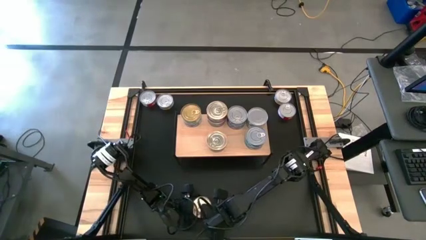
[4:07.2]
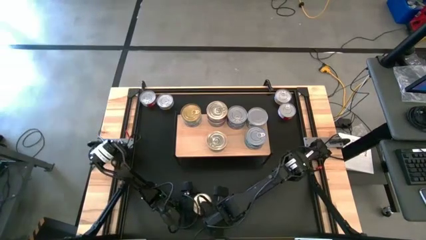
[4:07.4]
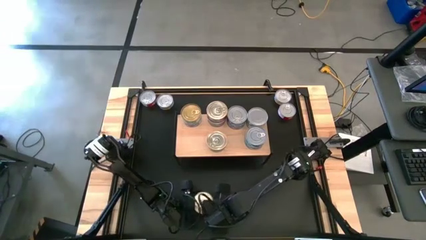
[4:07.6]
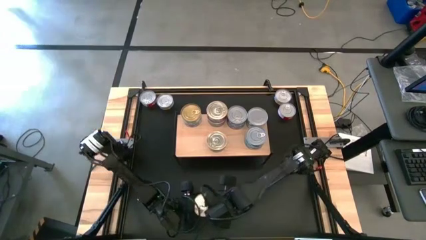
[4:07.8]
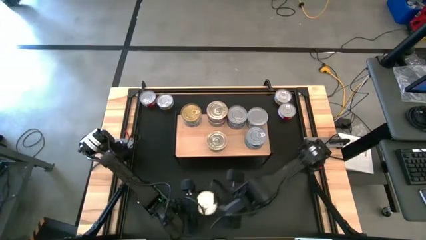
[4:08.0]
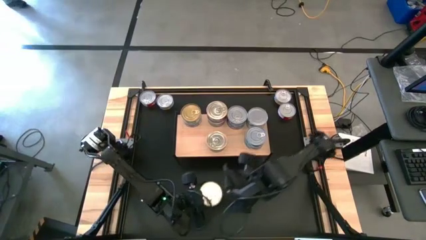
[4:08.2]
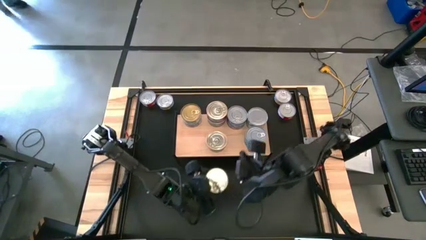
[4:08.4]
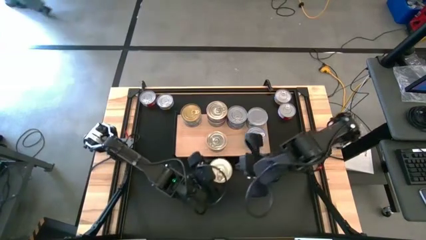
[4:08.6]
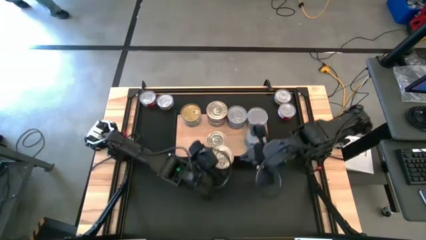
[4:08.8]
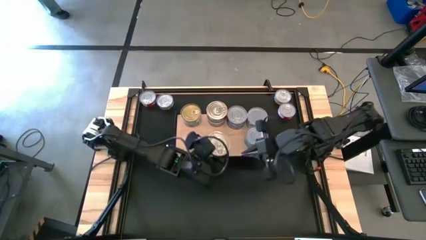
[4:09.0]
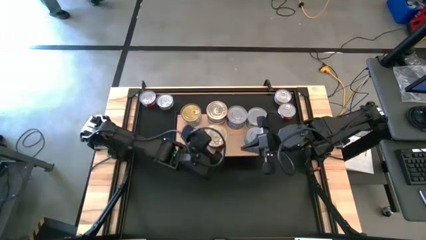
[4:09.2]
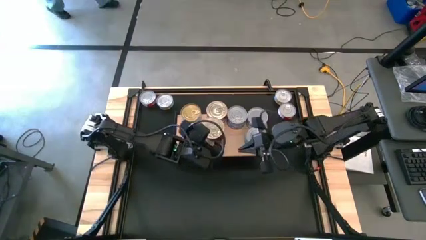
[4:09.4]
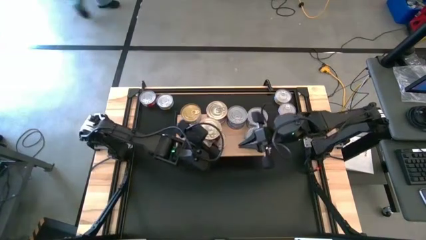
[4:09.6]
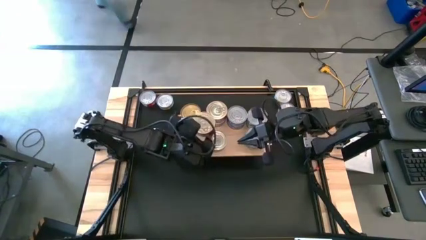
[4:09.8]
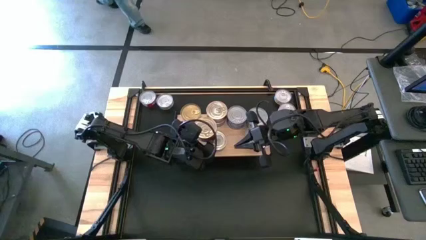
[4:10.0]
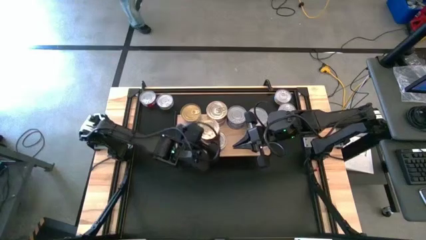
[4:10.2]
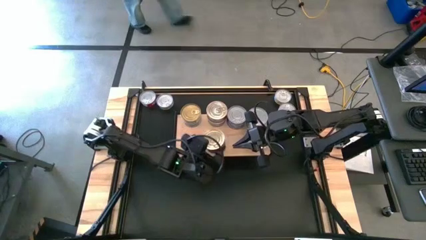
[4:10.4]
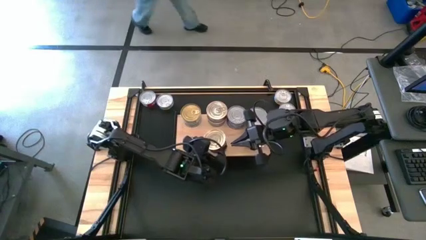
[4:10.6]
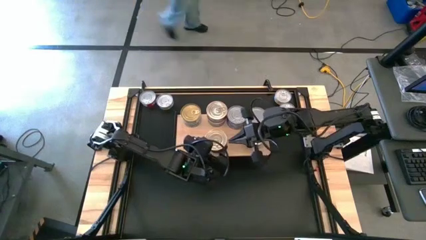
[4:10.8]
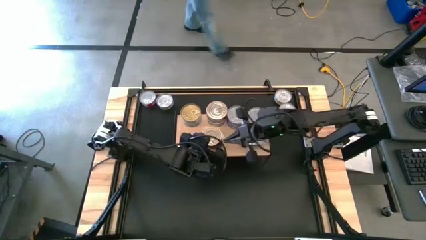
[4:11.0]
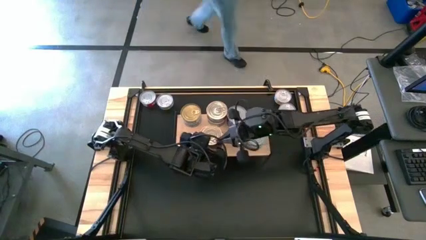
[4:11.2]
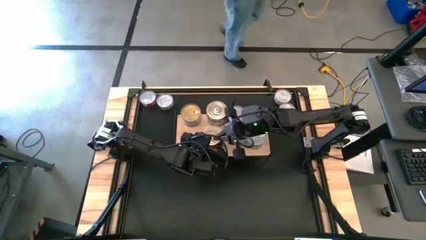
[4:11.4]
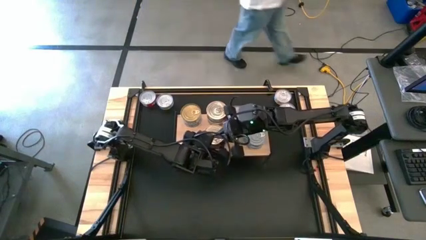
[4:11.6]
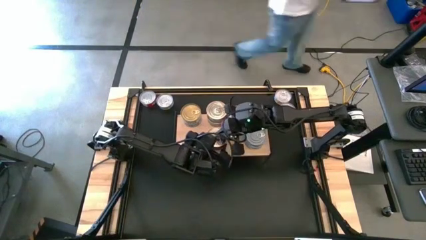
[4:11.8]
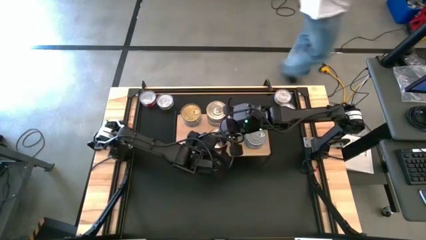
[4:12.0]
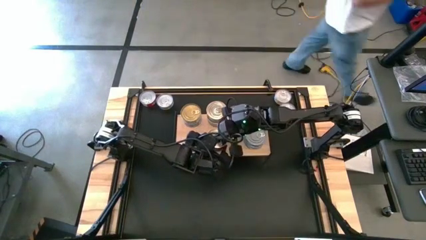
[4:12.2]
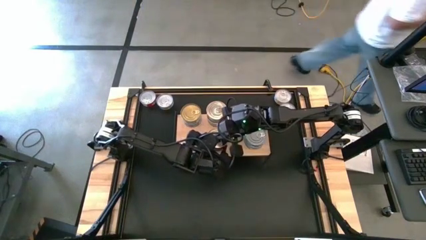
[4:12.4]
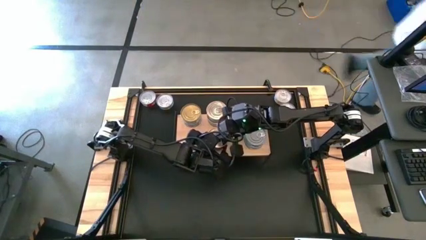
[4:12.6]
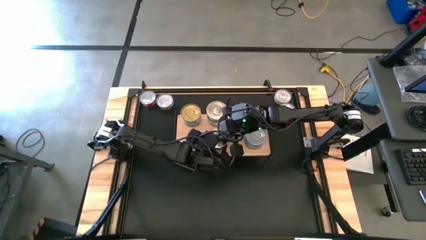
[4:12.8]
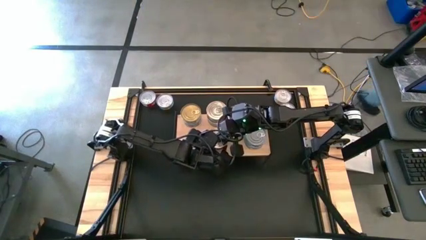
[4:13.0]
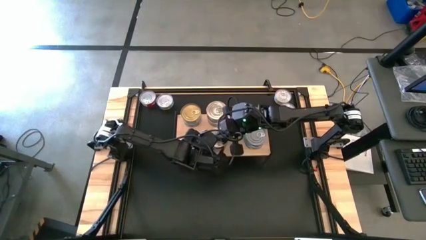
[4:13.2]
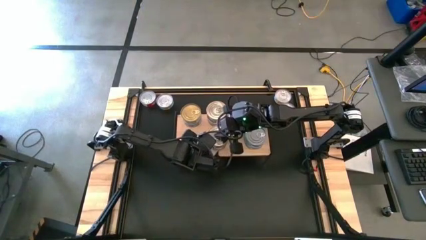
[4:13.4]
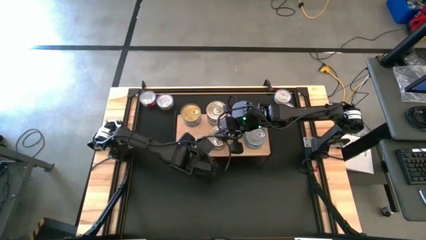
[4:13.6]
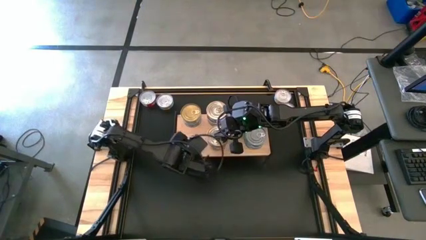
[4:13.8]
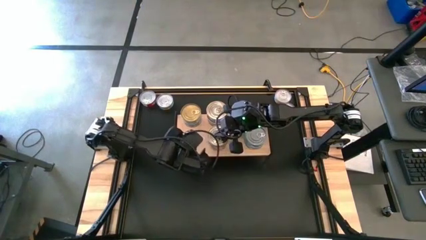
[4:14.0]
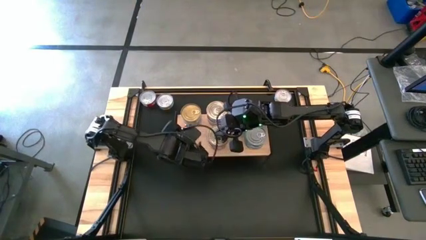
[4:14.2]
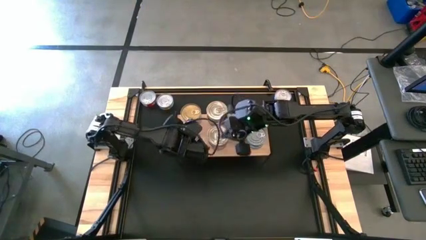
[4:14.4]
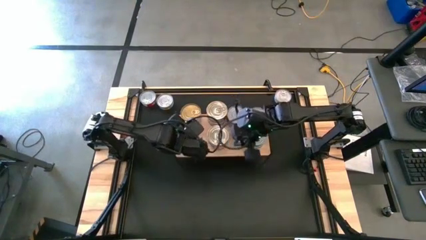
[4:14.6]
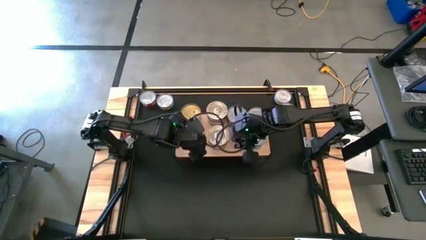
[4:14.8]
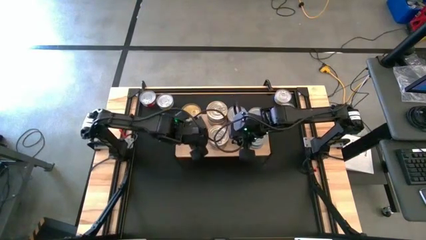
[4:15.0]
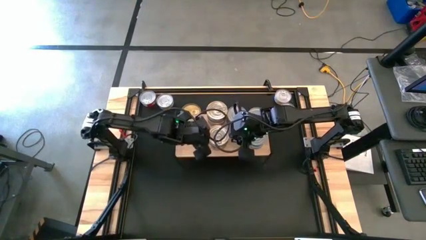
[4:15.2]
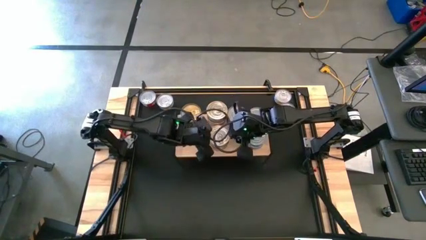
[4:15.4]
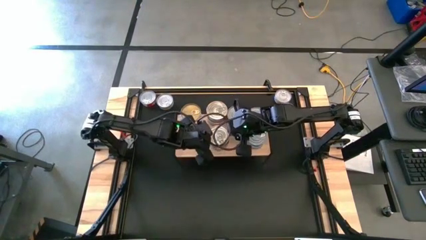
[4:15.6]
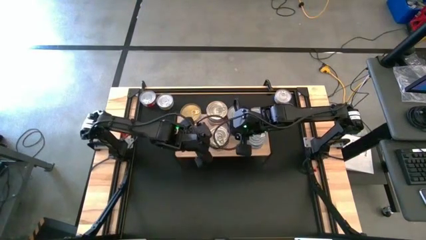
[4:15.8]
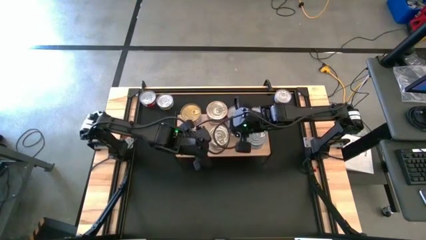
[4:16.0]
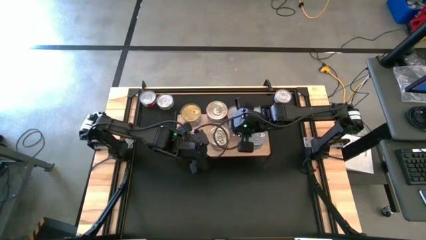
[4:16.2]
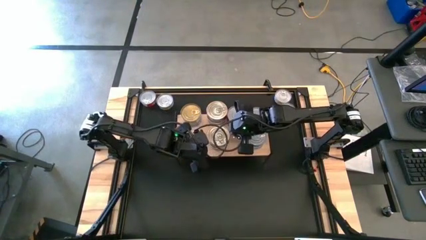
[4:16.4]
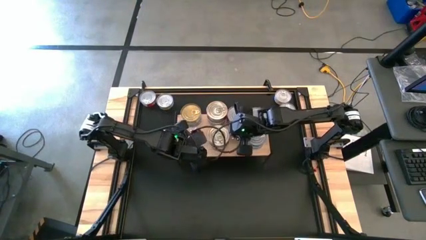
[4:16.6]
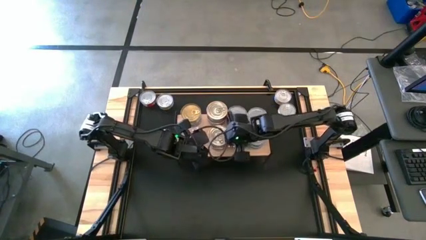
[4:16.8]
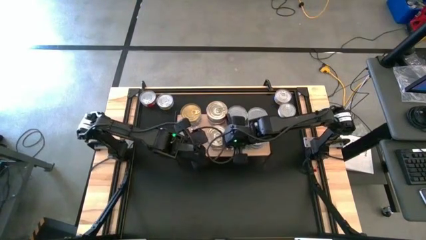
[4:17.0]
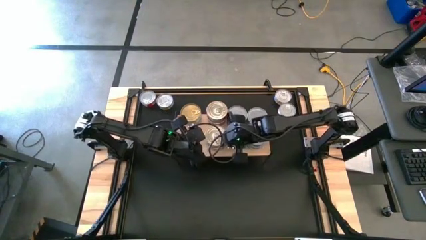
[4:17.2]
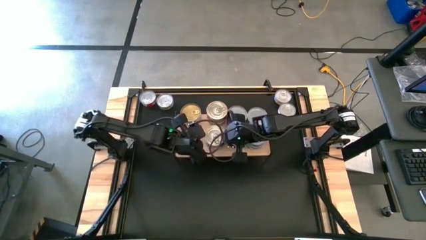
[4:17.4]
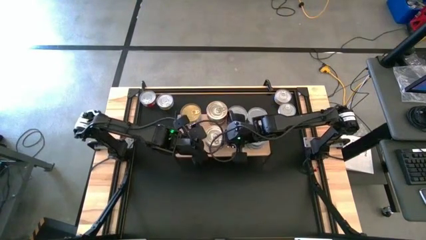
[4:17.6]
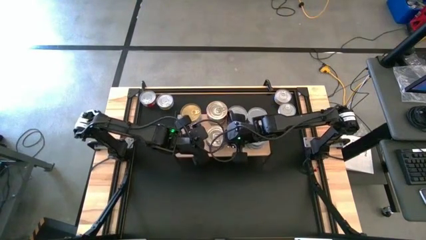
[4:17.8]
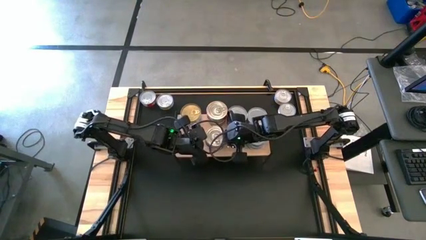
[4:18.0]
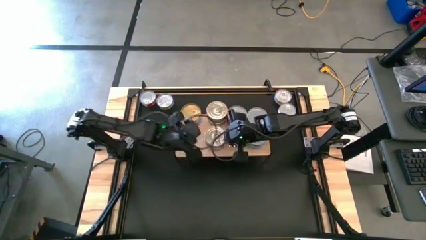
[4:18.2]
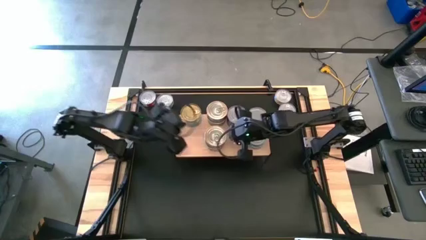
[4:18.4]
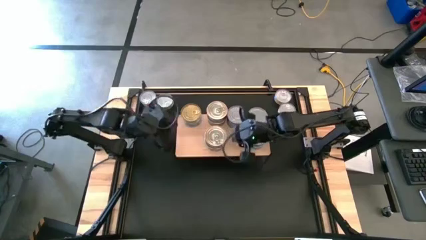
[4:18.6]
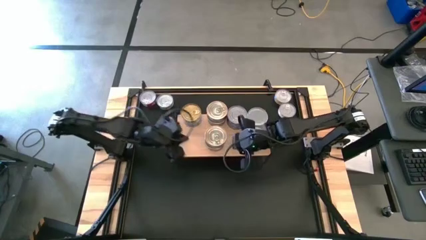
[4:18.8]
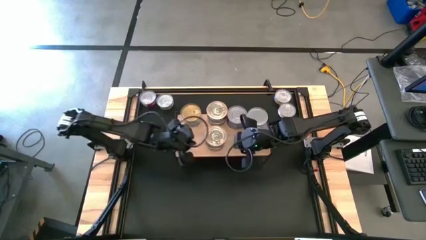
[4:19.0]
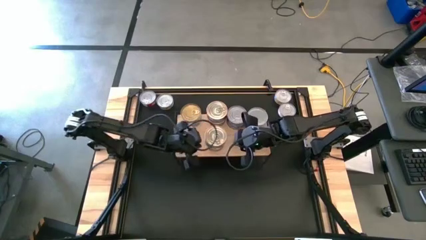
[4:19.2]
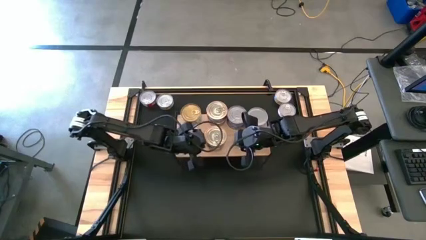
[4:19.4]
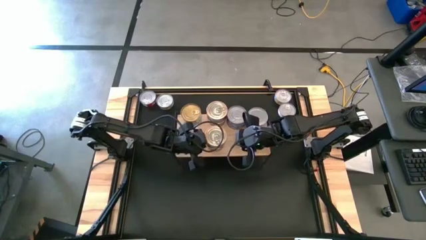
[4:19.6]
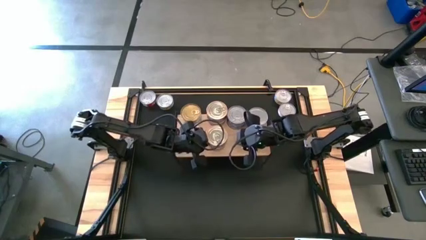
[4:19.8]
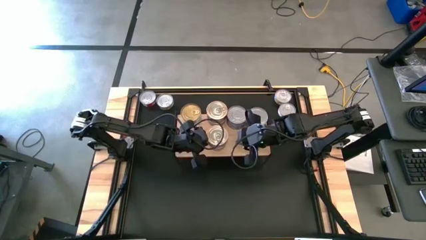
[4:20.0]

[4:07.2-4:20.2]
Task: Stack canned seafood by type on shelf
Stack the blue pink tuna can on top of the blue pink tuna can on the shelf

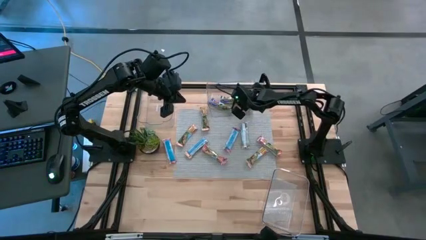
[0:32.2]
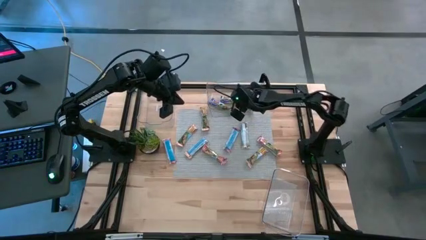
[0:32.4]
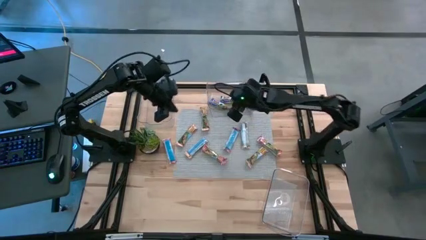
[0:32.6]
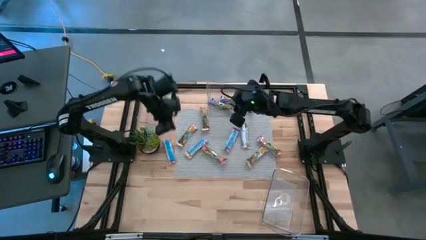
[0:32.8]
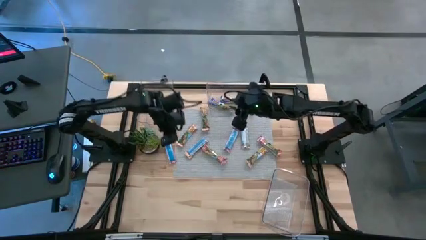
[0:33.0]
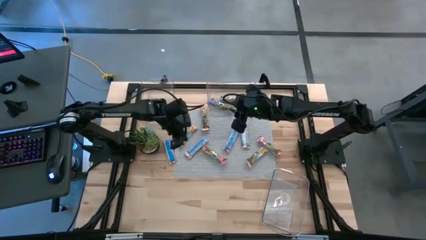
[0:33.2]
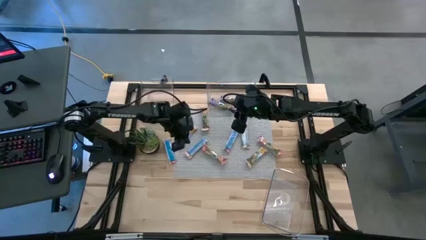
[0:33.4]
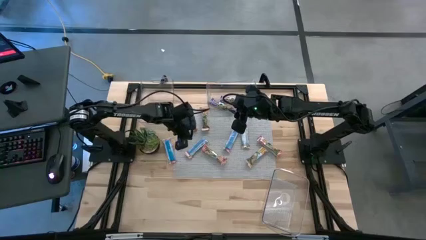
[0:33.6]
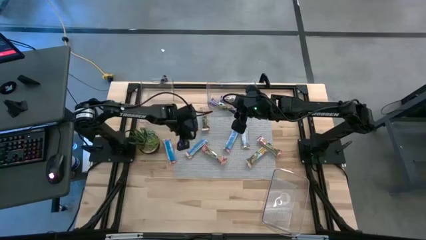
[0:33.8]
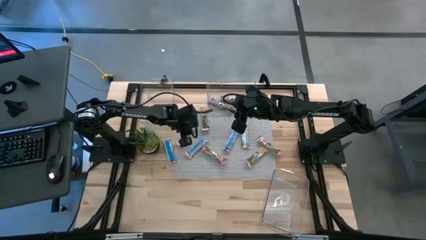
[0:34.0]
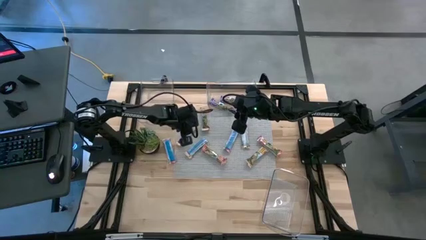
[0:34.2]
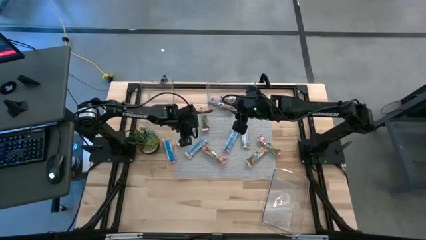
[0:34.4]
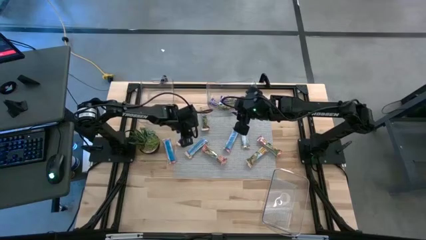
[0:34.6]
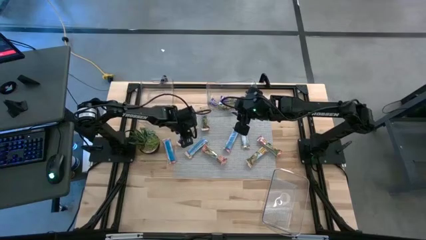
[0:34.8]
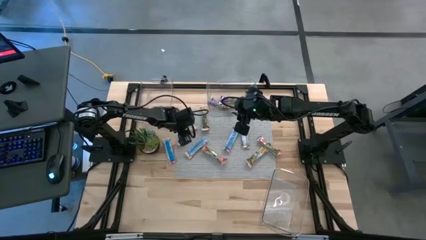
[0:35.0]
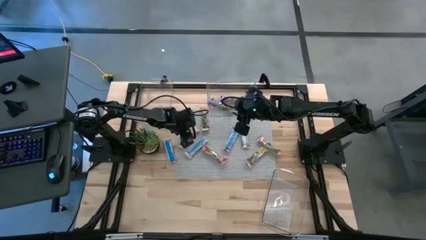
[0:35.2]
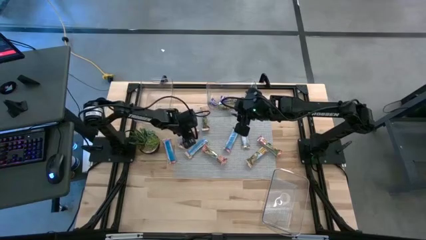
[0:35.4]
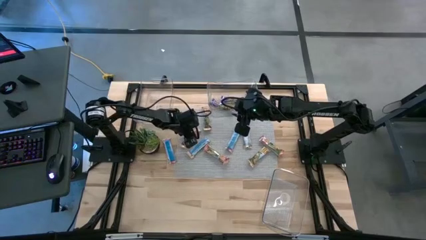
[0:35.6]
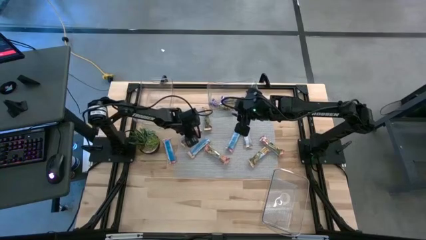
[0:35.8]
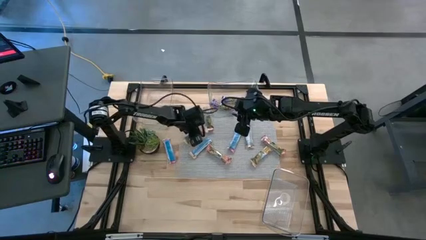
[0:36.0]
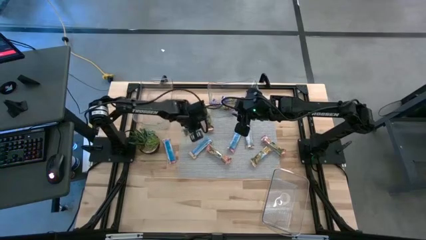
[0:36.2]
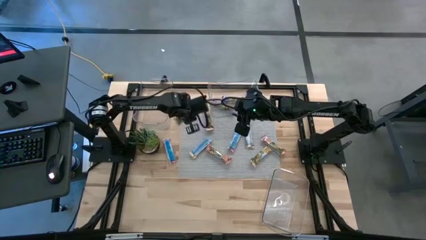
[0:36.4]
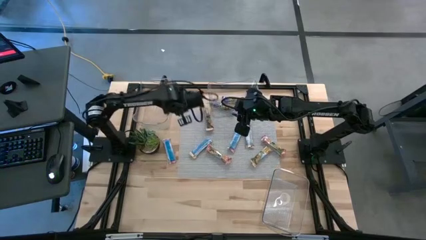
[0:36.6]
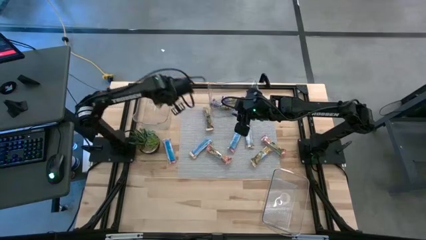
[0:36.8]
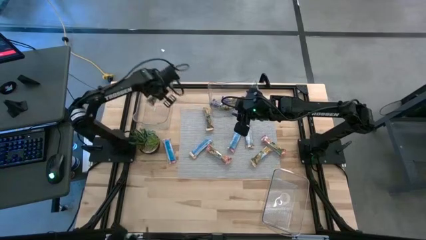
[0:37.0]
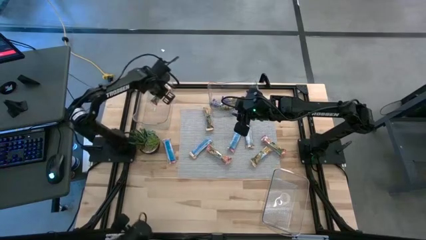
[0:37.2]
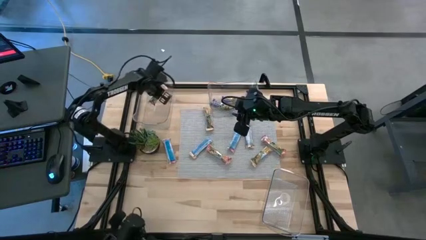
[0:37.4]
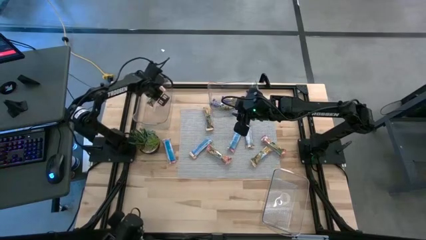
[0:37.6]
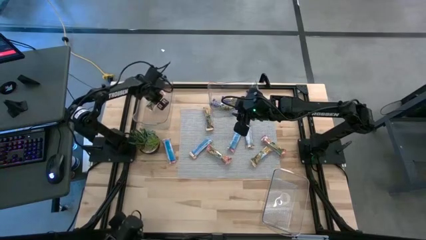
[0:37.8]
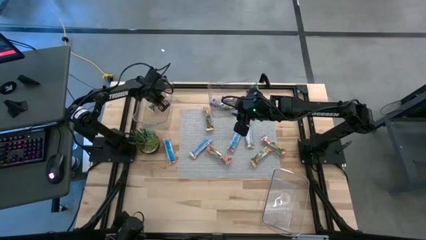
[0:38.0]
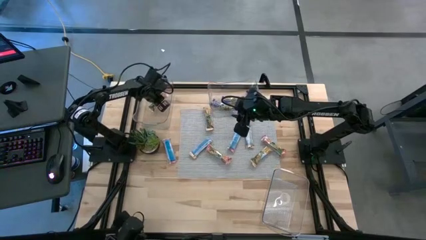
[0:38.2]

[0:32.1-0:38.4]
Task: Pick and place Granola Bars by type
Put the yellow granola bar into the left transparent bin
